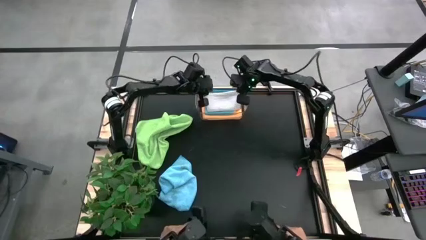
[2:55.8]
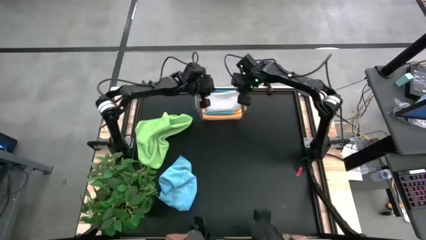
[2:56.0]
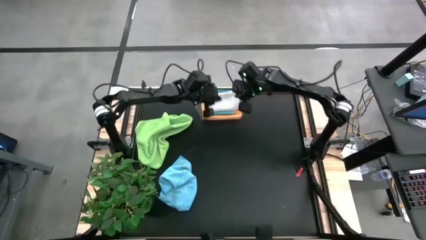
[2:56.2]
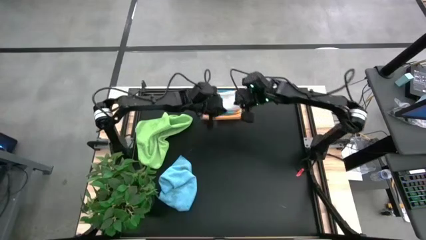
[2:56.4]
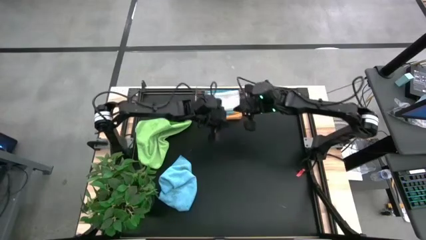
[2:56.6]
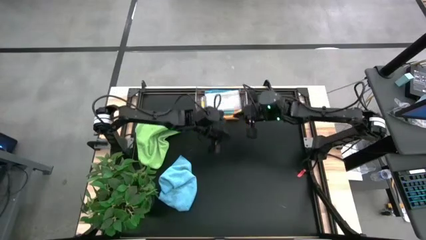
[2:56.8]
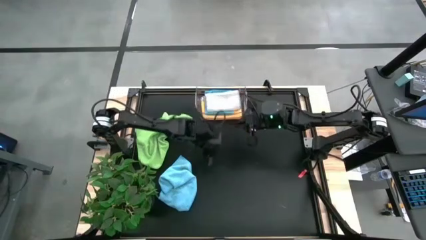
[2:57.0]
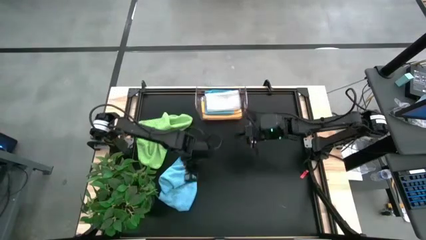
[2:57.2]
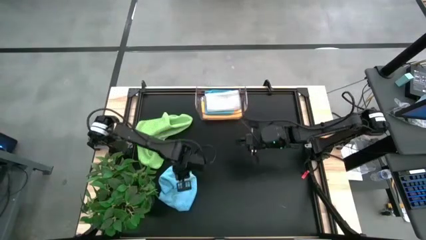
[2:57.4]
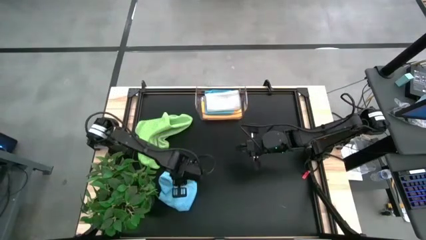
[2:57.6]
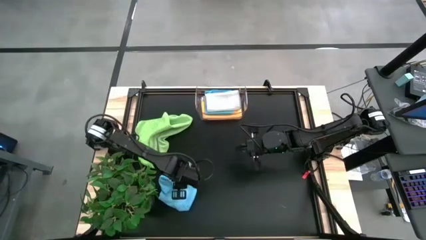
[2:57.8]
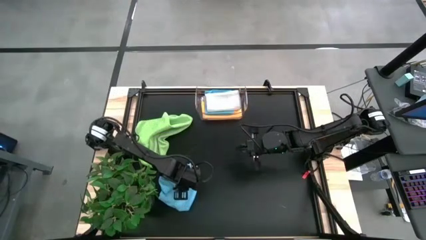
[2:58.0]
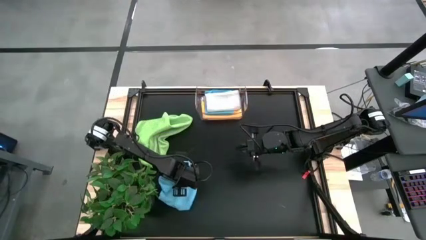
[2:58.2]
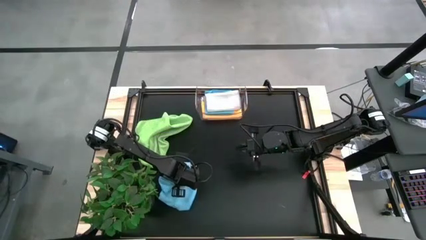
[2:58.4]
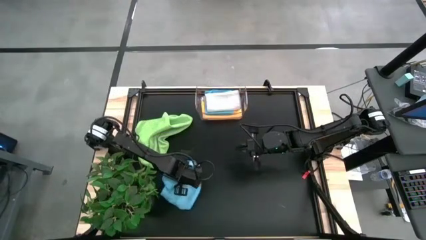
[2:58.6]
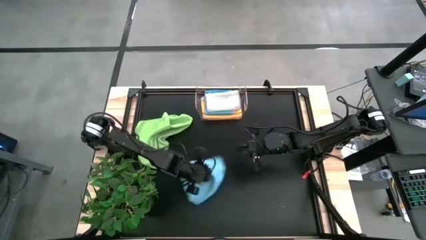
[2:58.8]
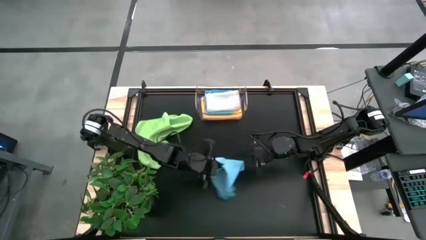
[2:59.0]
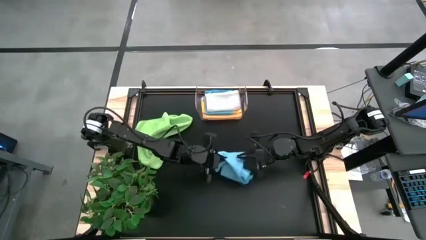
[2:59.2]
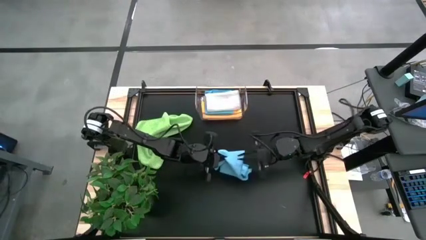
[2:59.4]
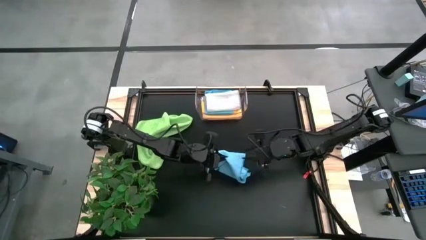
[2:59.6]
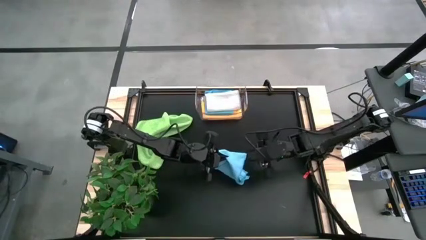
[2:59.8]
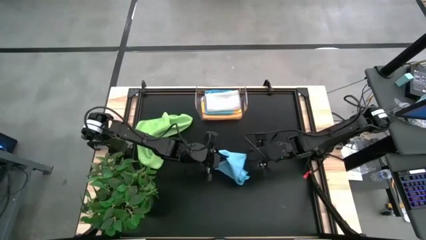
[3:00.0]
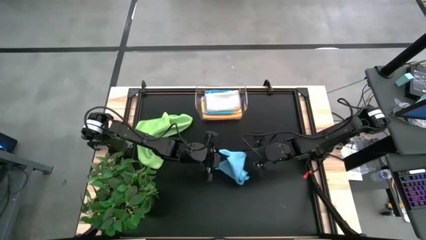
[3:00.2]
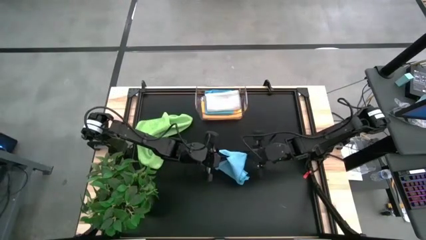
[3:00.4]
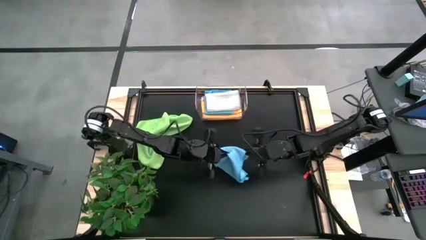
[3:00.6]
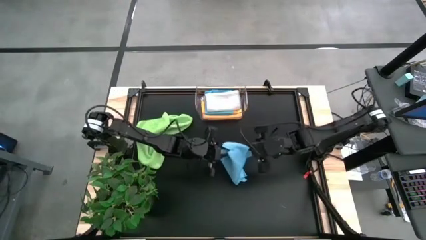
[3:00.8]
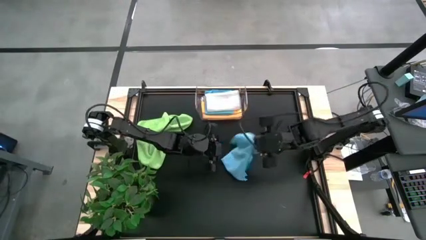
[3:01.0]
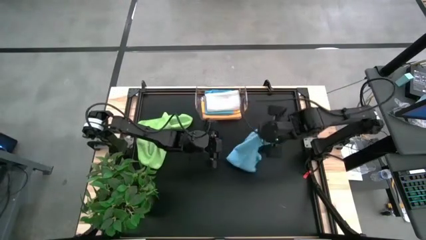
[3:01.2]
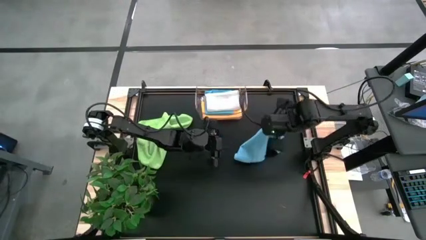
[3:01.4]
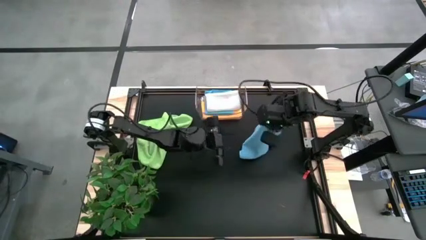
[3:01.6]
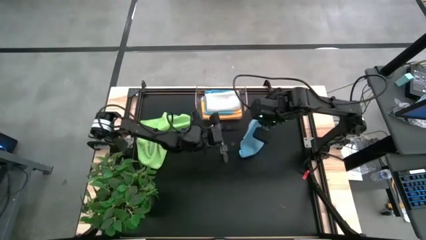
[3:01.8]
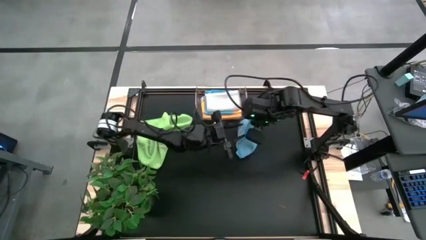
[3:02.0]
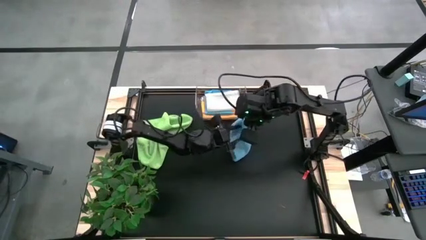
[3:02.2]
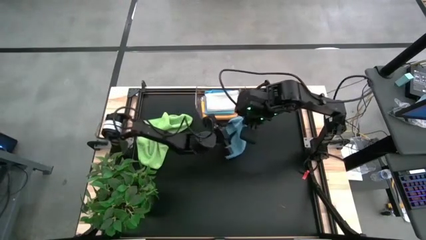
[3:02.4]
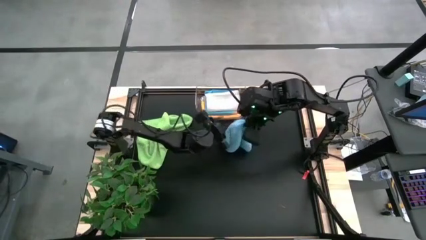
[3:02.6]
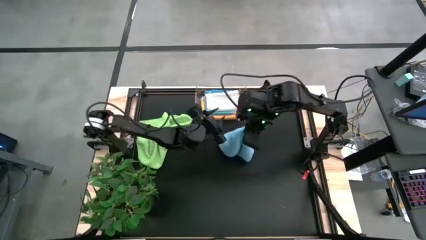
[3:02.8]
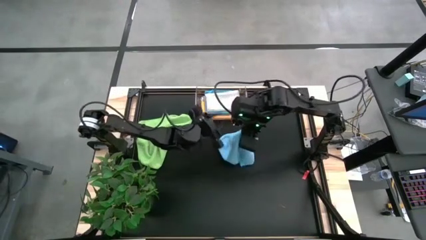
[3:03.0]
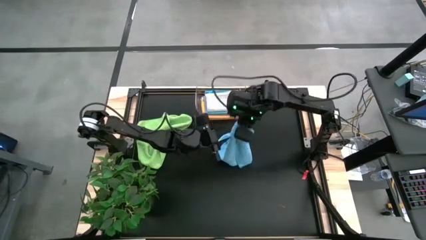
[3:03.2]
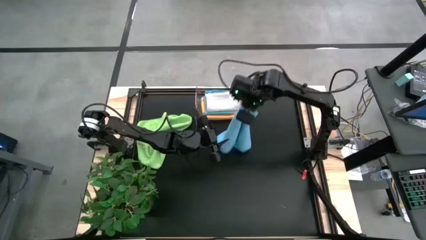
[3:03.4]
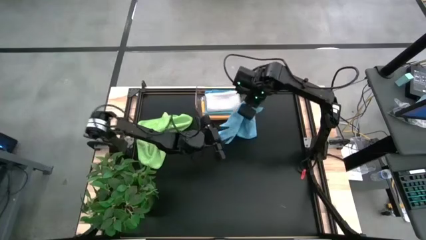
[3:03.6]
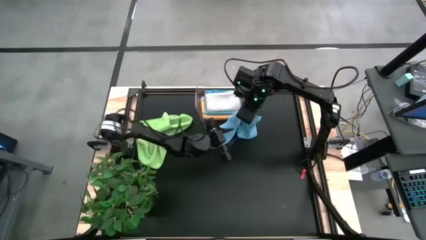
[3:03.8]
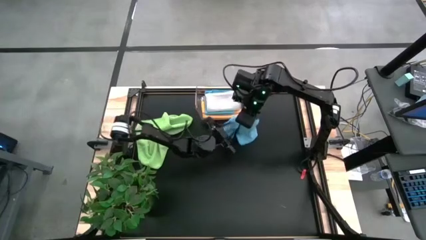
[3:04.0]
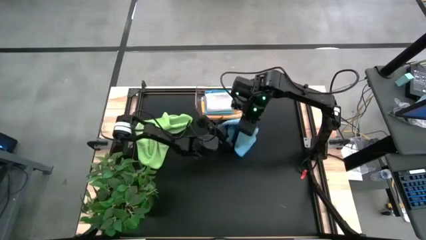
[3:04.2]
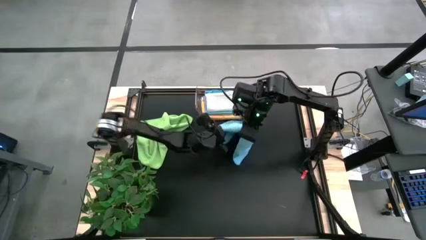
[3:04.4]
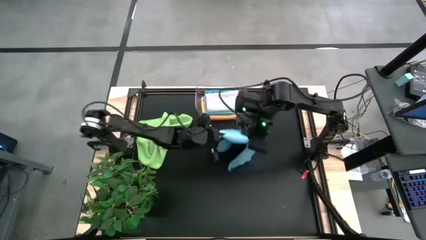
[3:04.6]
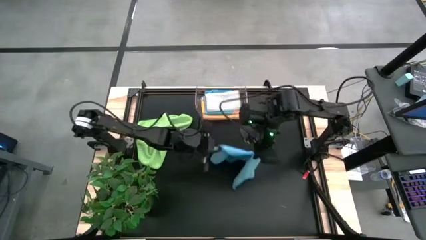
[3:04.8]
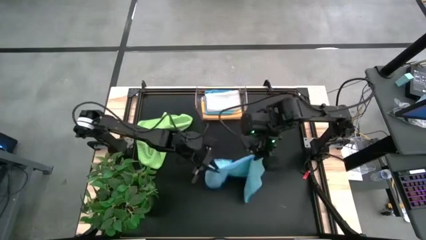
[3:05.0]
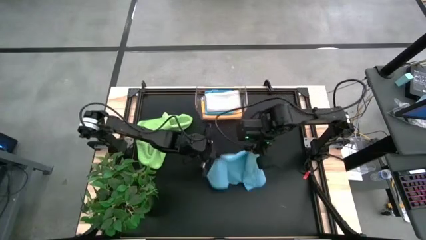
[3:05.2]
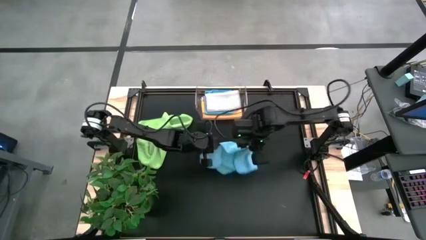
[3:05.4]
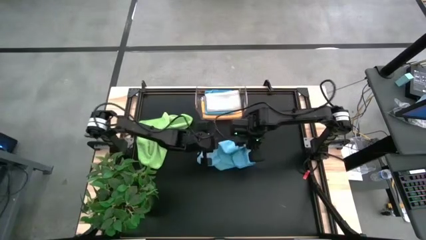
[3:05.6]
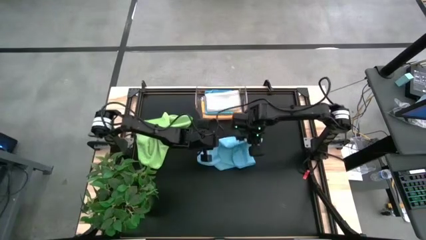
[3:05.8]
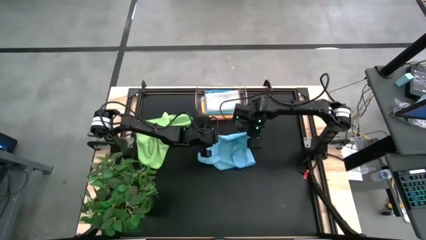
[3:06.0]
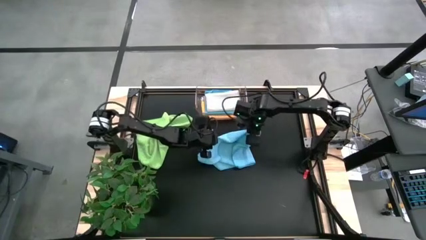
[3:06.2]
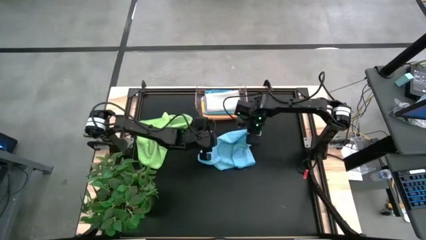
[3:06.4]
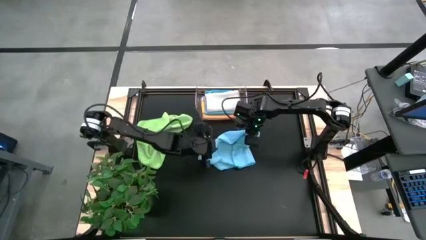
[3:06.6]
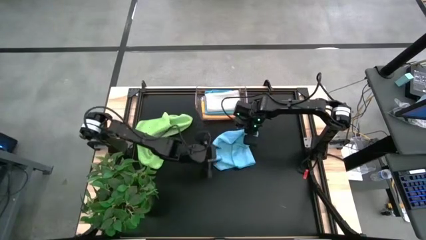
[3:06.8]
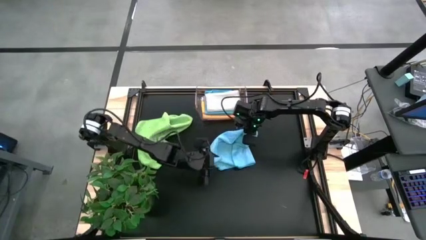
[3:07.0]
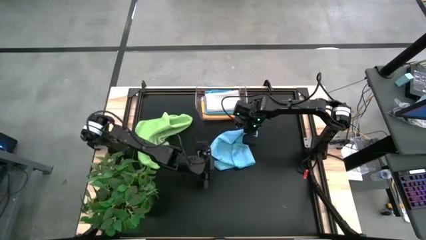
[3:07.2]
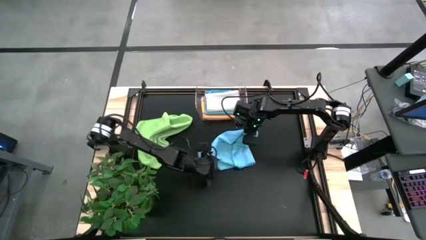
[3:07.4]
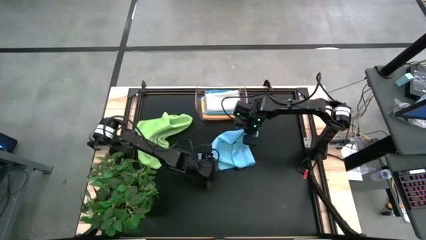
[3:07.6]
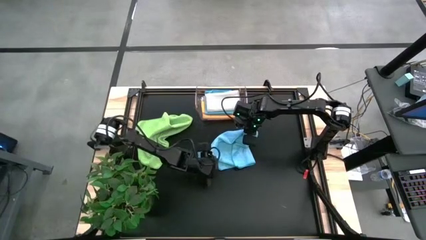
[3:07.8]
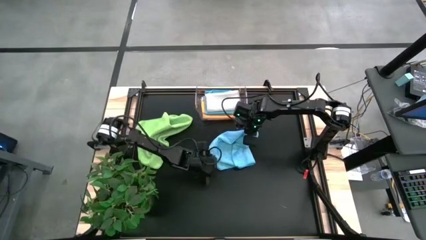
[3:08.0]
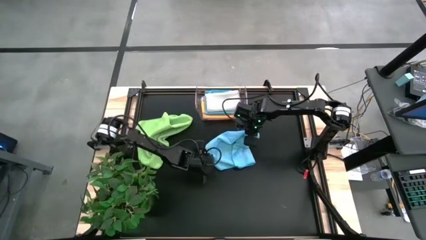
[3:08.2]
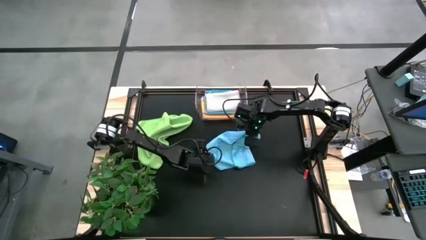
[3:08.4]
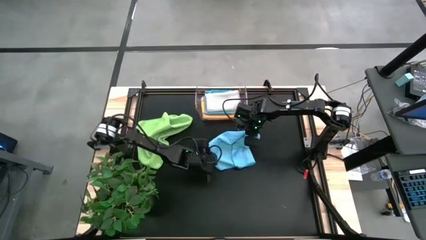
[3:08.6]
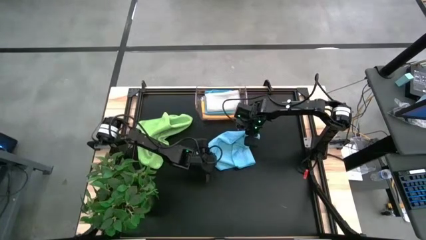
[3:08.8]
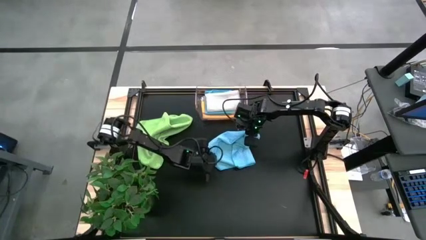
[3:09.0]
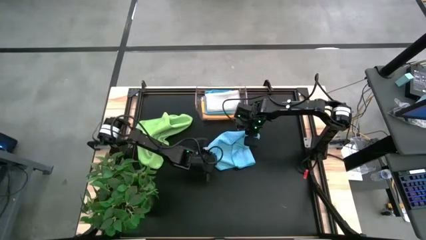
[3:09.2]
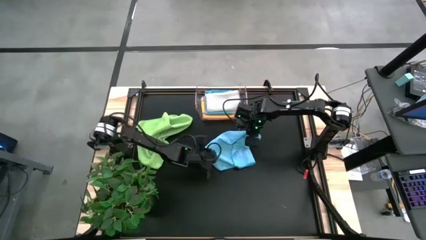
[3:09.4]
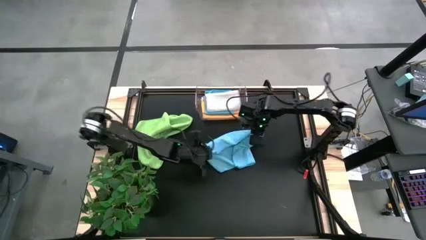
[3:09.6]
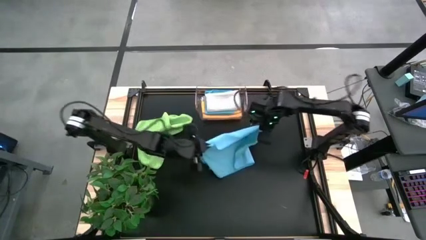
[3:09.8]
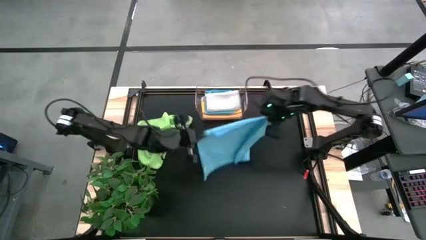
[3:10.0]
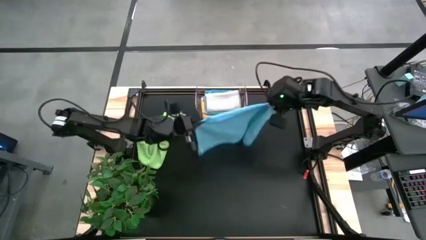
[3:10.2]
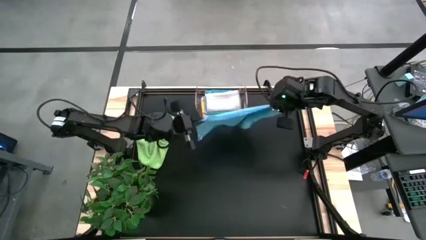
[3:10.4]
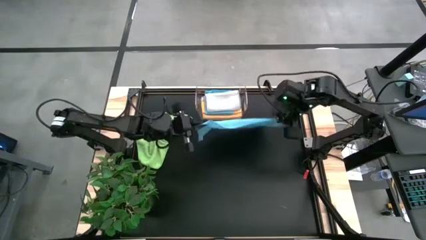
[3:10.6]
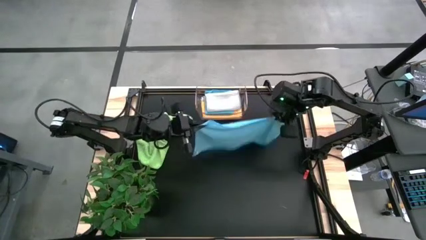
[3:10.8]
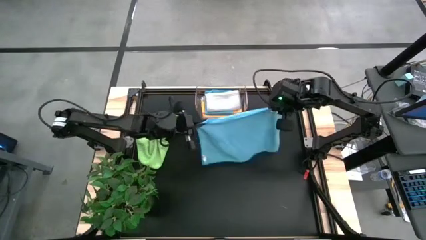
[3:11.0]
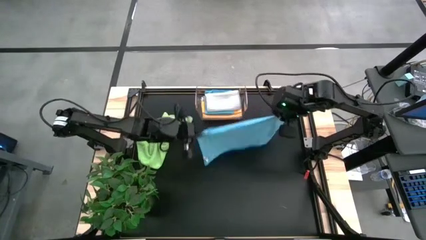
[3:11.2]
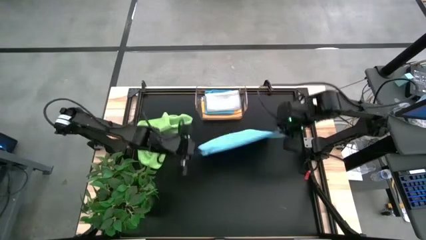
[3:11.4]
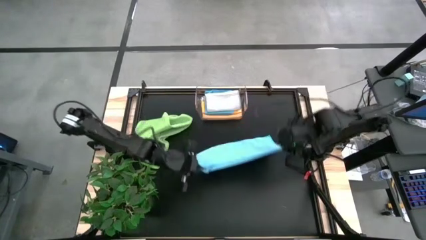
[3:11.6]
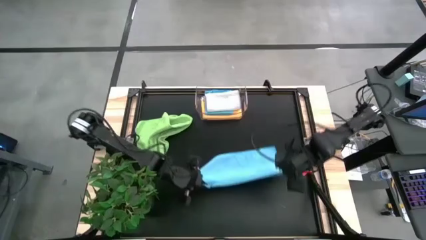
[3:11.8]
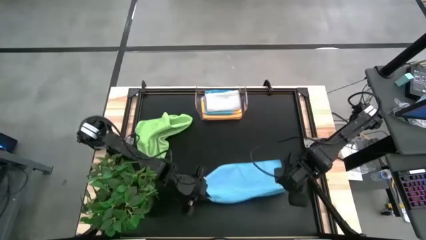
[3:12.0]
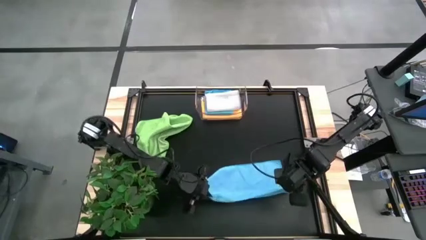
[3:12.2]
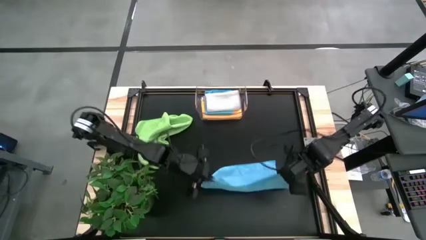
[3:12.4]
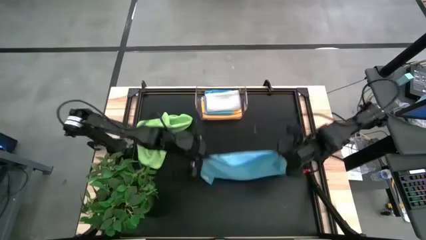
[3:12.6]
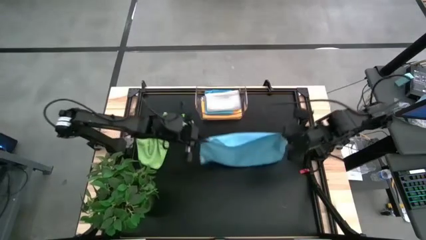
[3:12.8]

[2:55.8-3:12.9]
Task: Fold microfiber towels
Fold the blue microfiber cloth
